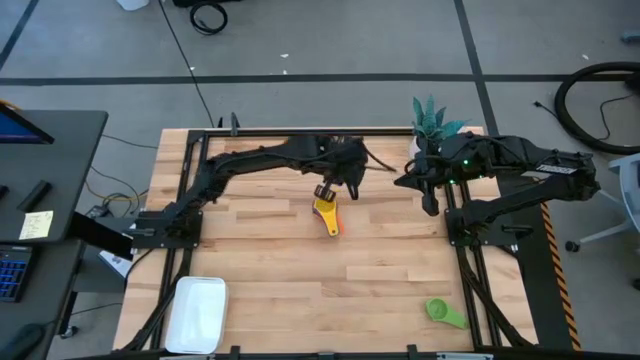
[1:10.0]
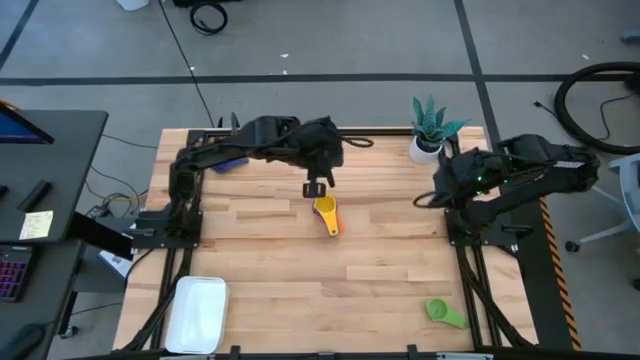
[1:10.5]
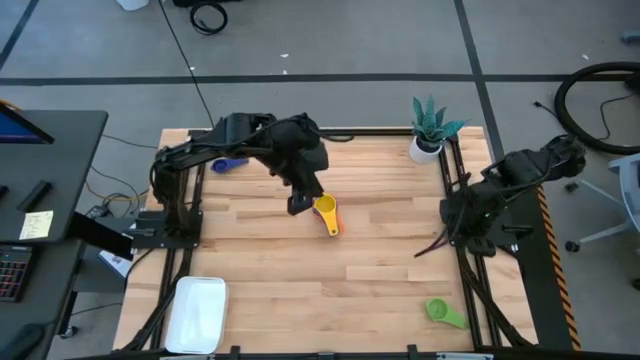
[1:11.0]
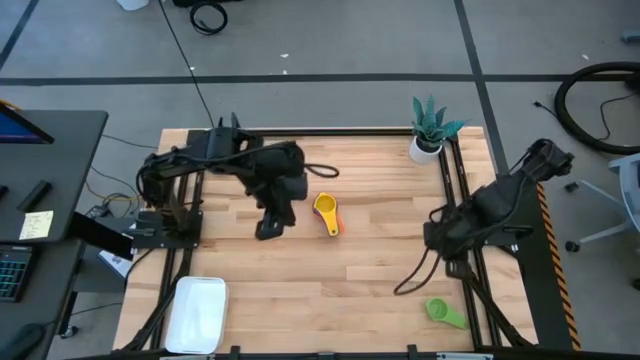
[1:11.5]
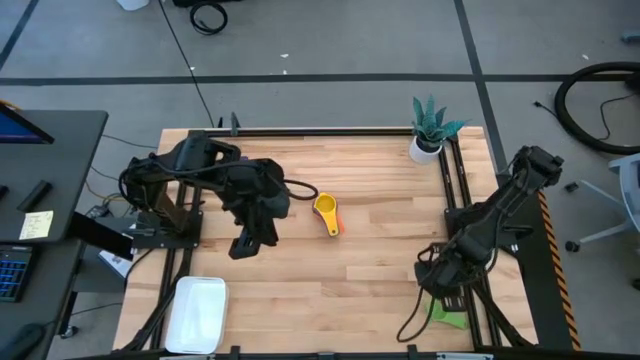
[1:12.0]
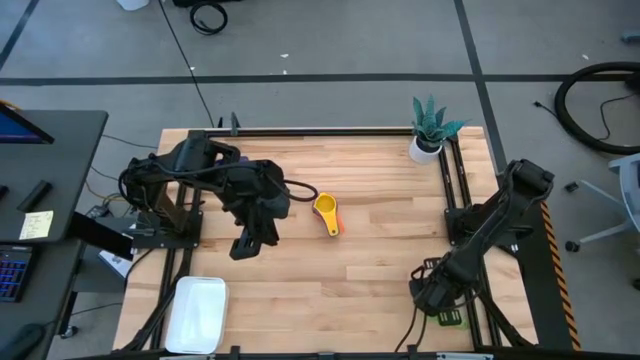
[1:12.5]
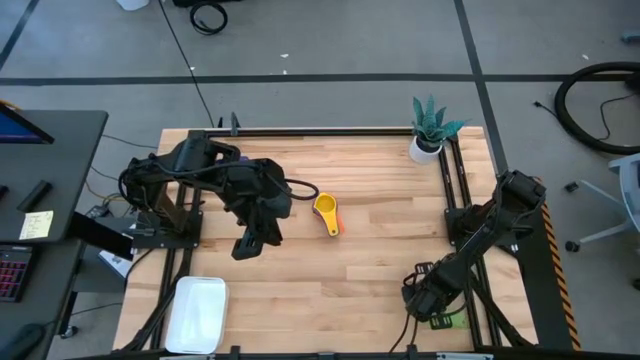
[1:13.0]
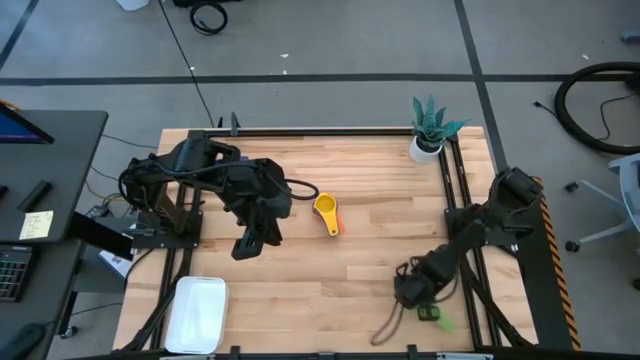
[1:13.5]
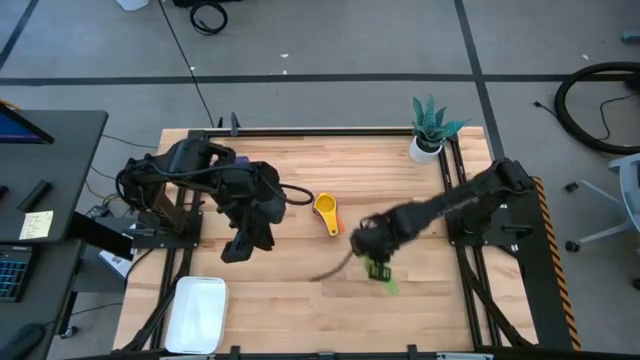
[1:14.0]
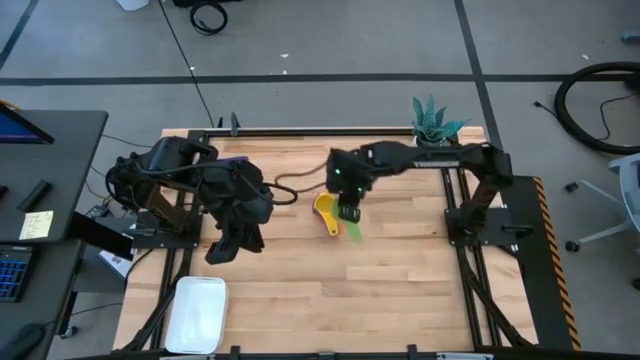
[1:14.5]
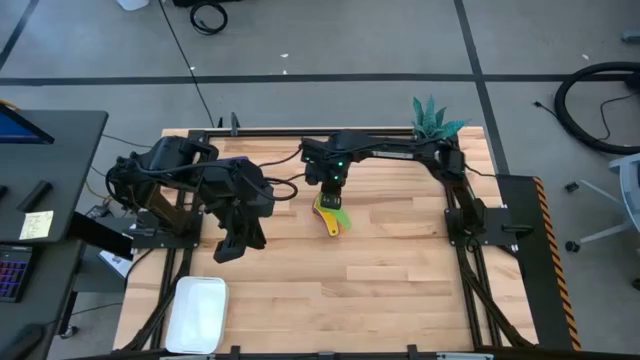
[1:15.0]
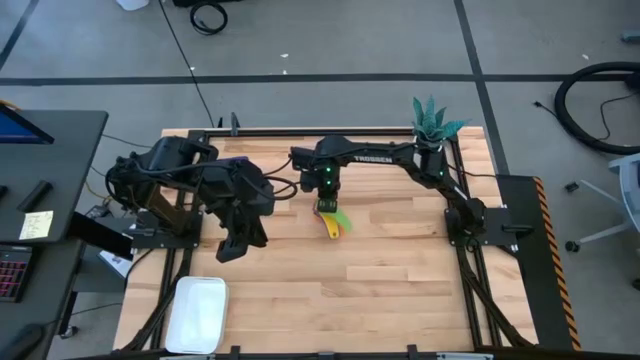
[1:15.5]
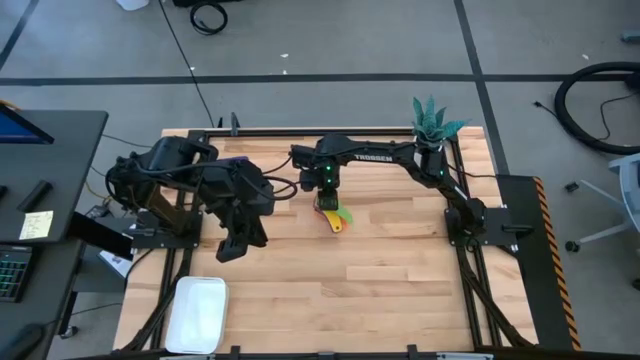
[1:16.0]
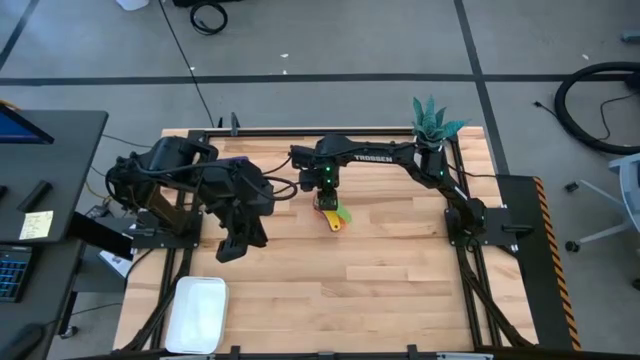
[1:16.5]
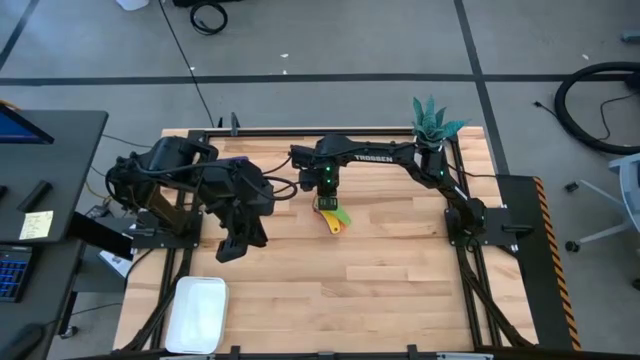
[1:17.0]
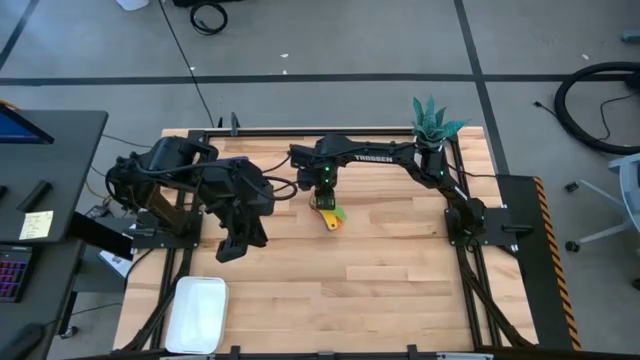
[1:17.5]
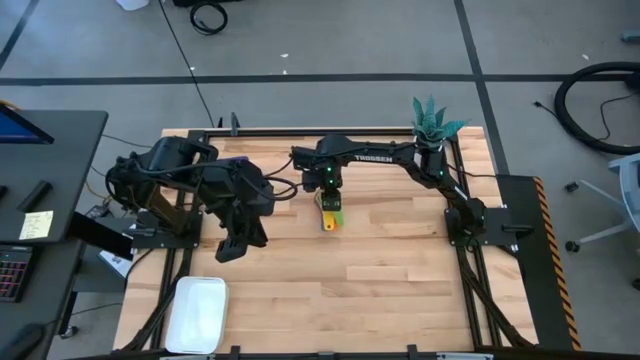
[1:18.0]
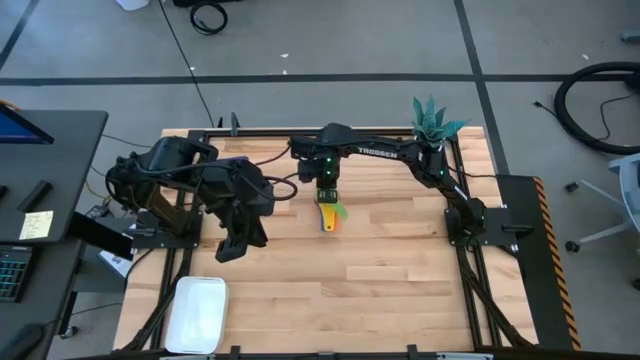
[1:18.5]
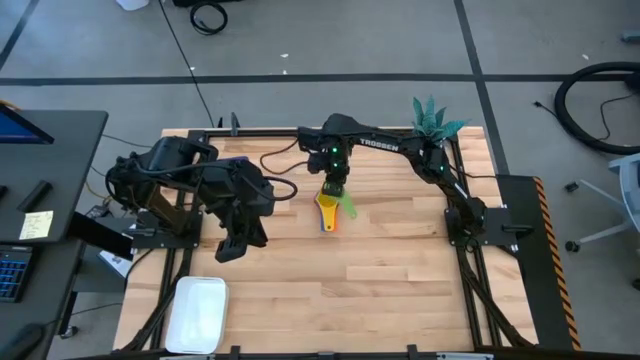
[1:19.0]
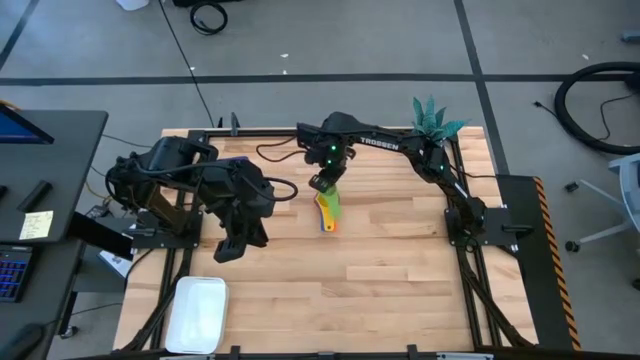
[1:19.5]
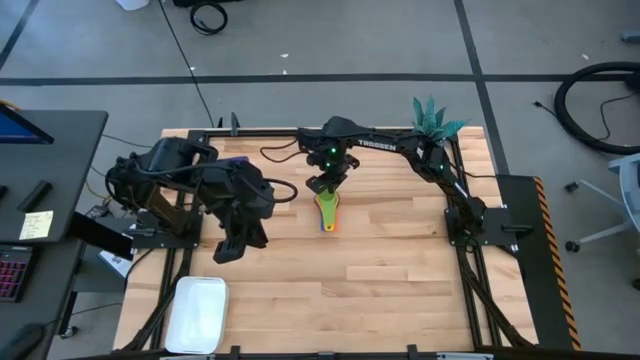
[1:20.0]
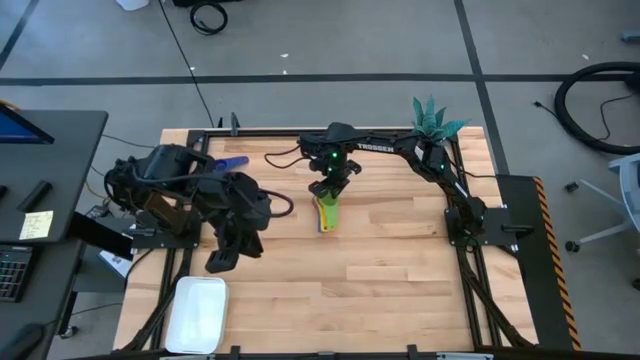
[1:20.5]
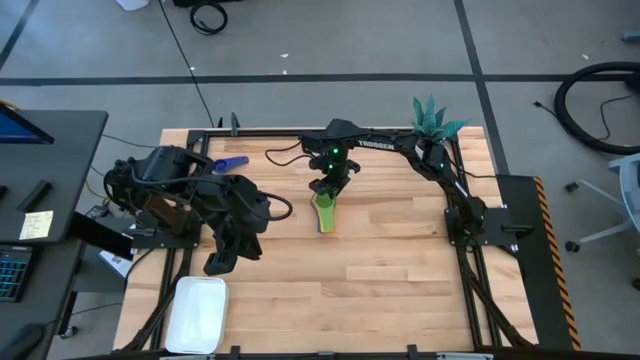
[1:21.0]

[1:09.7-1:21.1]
Task: Nest measuring cups in basket
Stack the green measuring cup on top of the yellow measuring cup

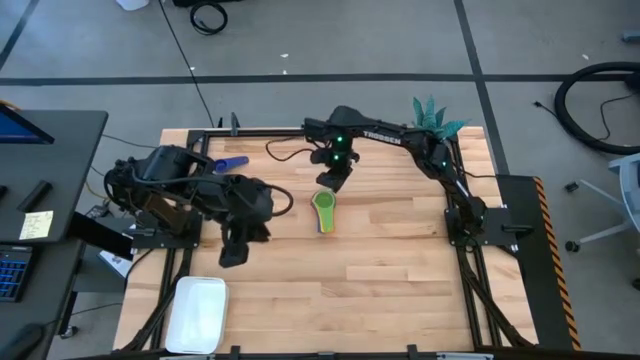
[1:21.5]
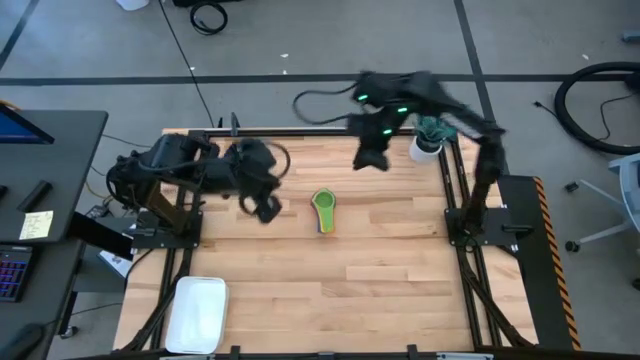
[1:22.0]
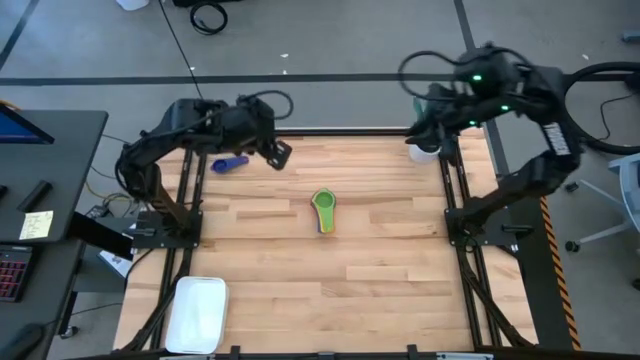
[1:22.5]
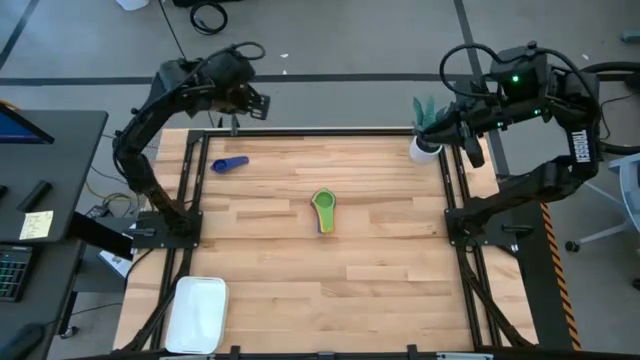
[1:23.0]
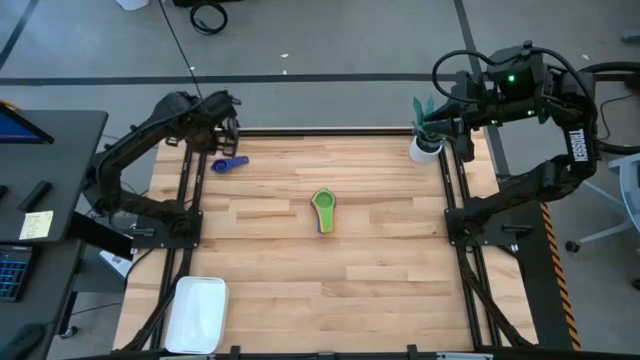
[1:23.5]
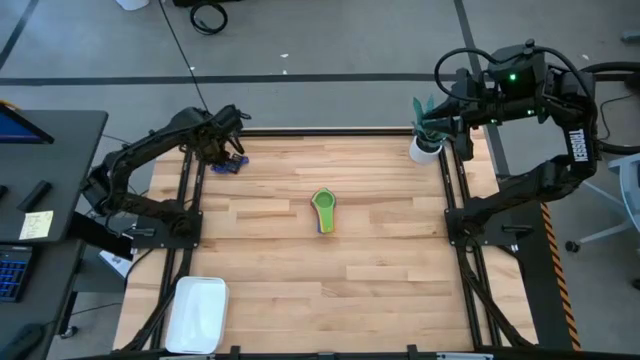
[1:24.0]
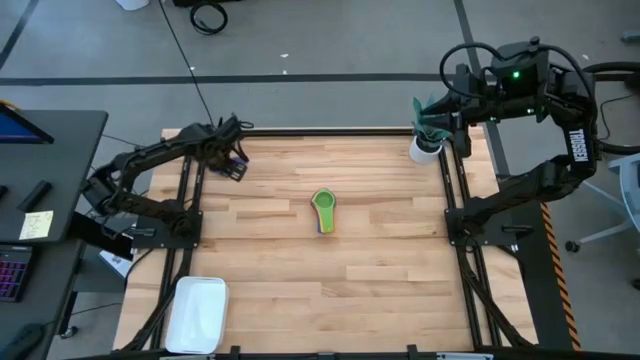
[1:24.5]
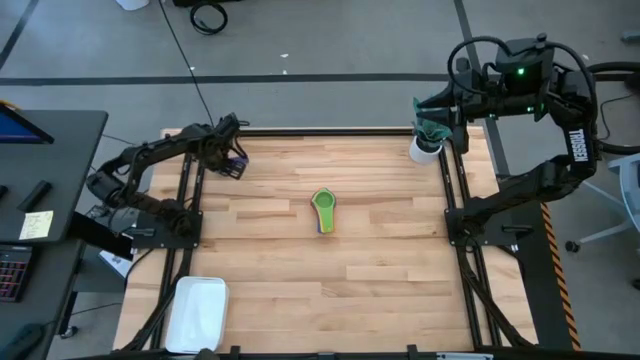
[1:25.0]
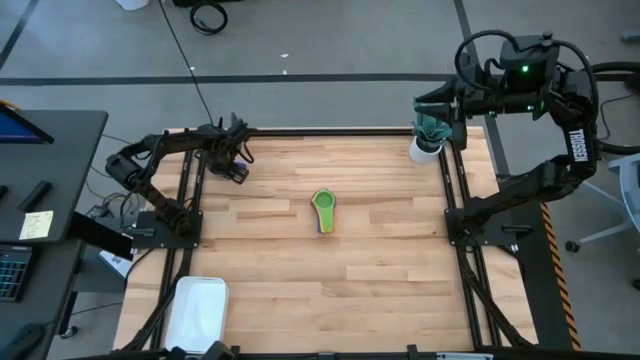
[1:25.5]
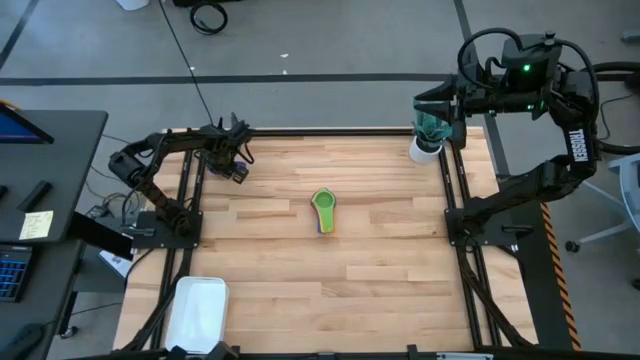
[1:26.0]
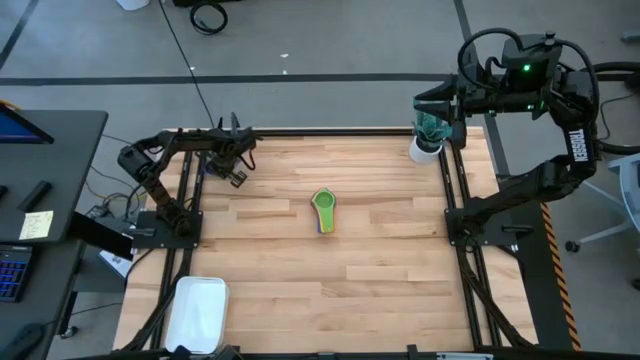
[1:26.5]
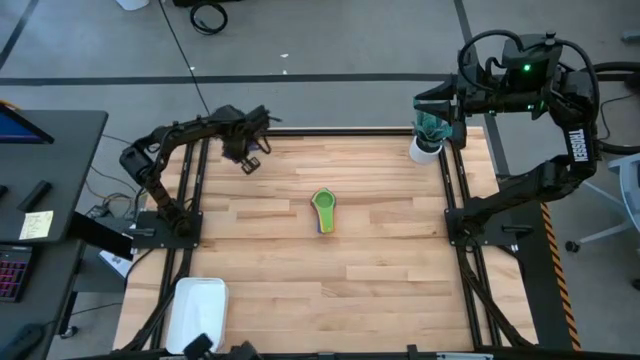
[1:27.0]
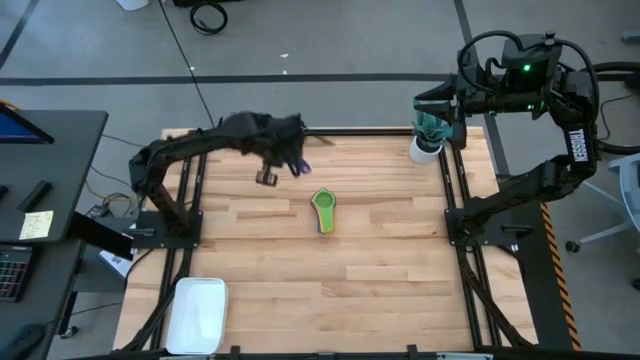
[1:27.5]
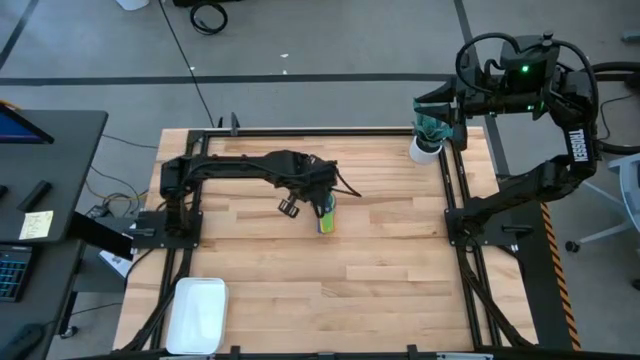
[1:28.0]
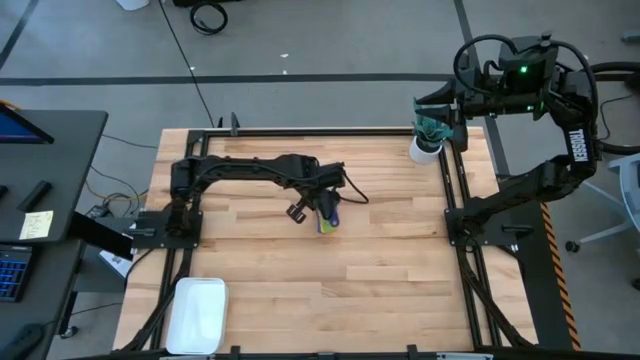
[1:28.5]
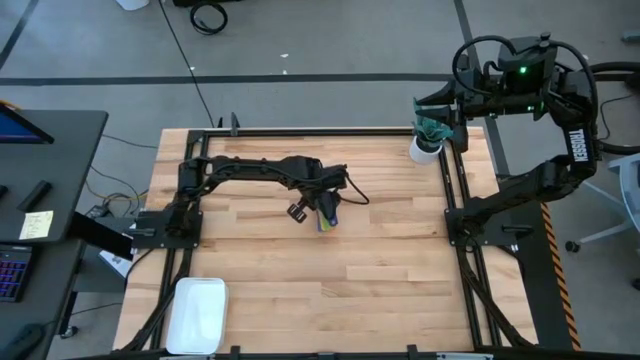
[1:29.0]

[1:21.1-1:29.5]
Stack the violet measuring cup on top of the green measuring cup

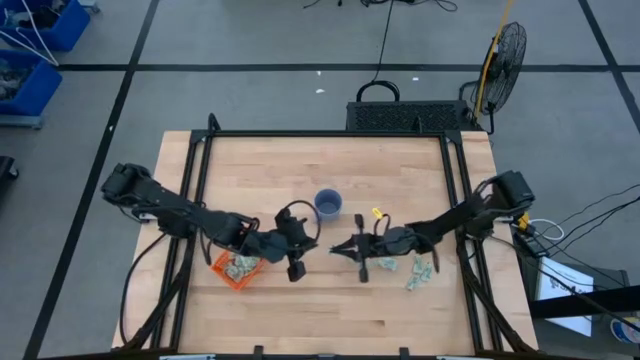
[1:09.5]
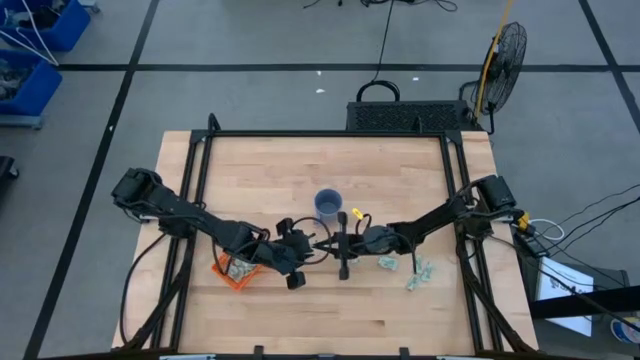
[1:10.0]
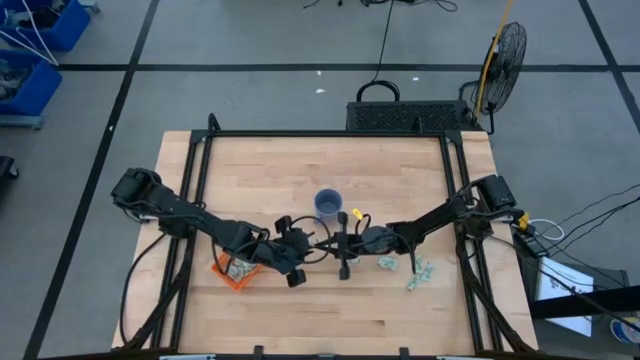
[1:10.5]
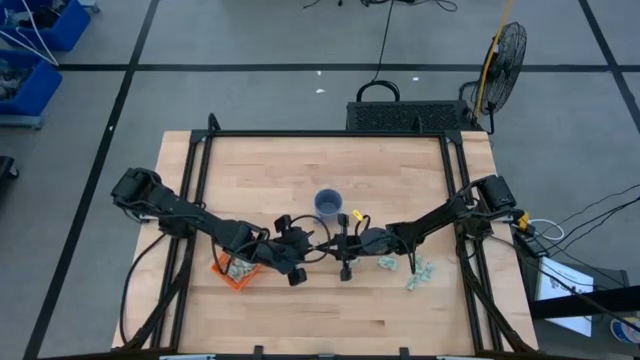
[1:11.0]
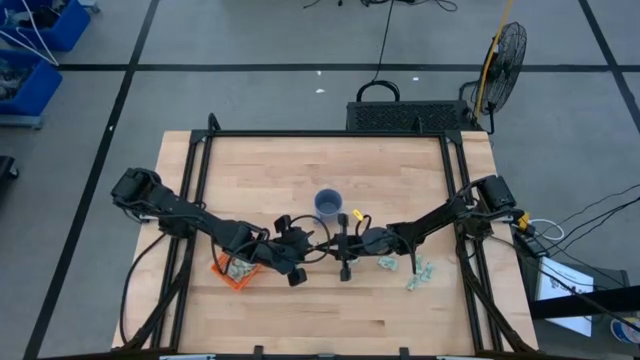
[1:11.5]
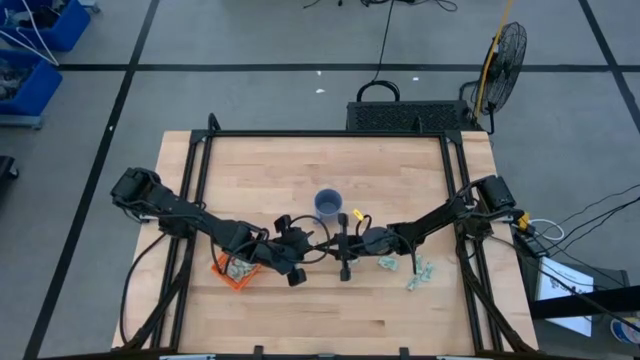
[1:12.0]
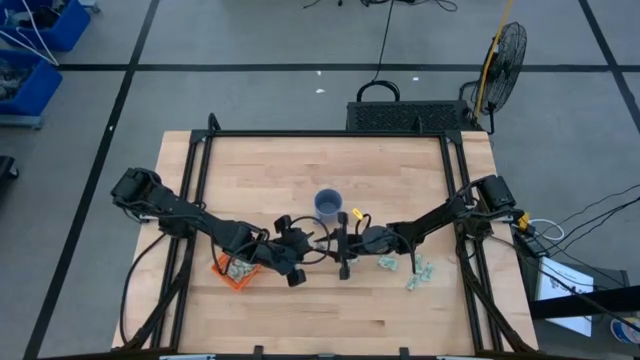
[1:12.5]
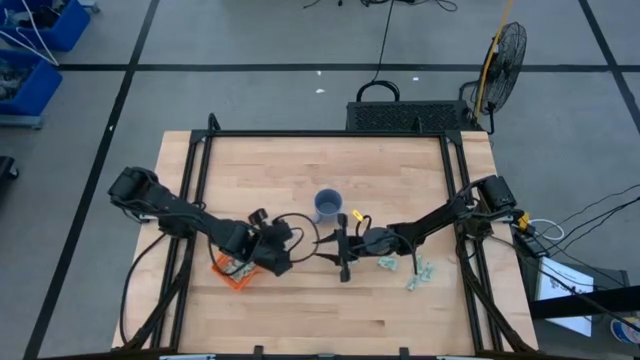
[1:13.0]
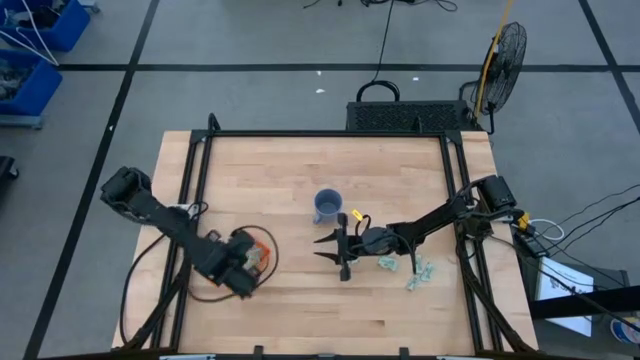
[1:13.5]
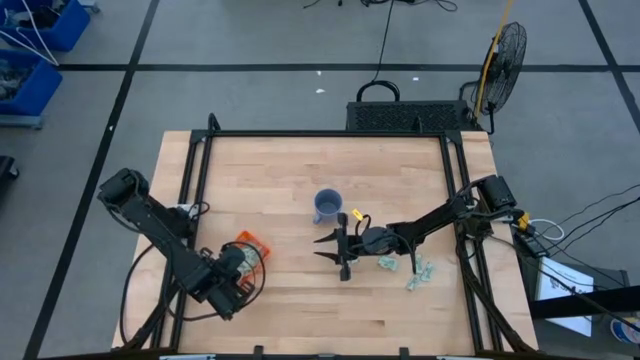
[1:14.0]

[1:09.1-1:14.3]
Task: Pick and place Stevia / Truvia into bins
Put the green stevia packet into the orange basket
